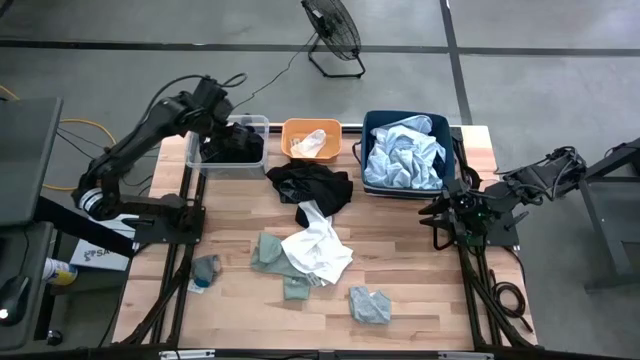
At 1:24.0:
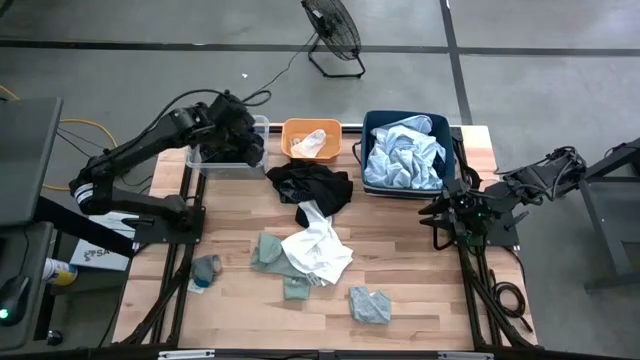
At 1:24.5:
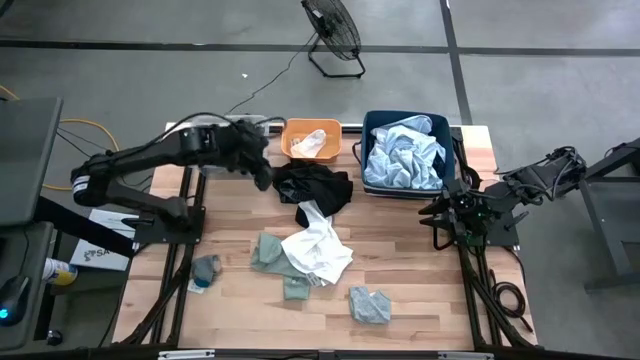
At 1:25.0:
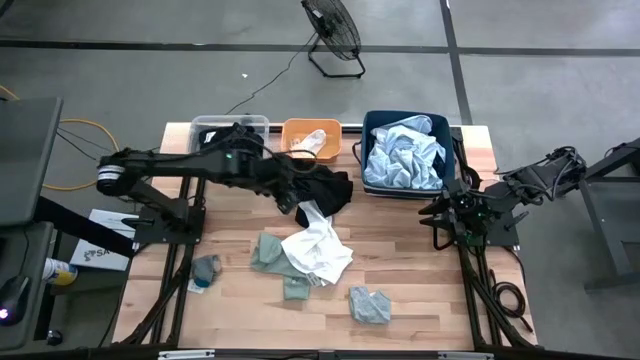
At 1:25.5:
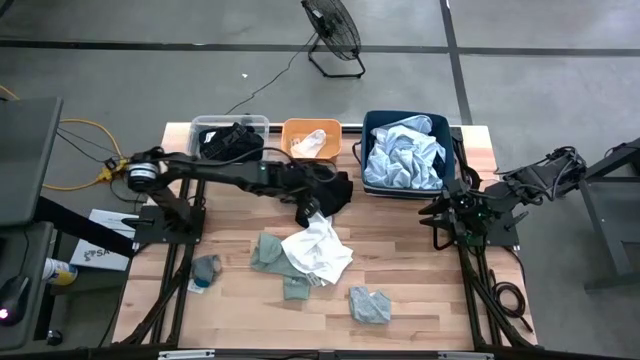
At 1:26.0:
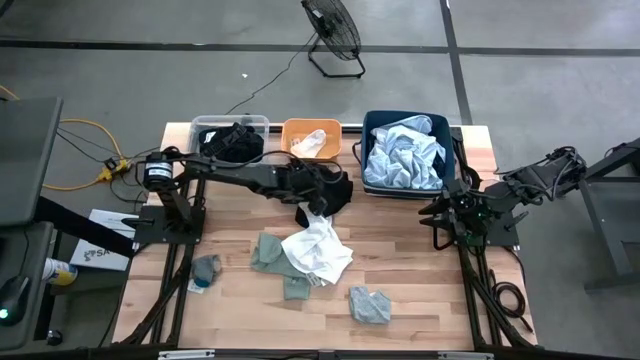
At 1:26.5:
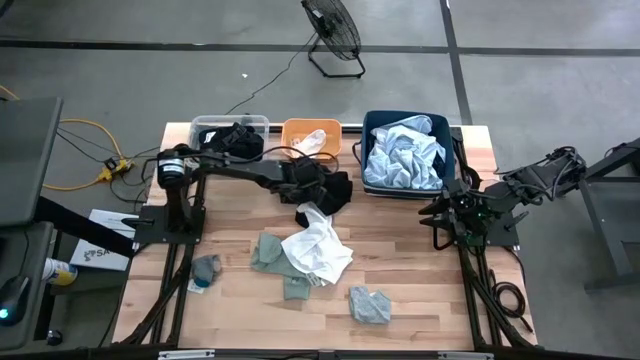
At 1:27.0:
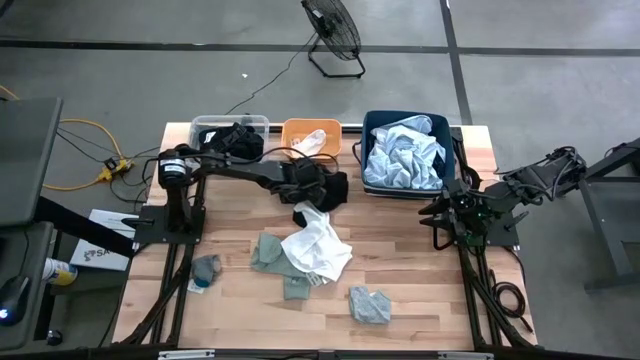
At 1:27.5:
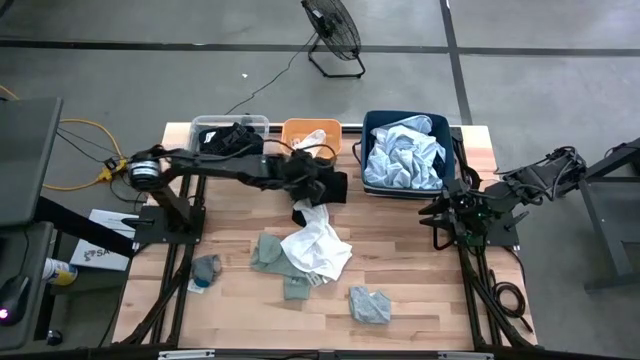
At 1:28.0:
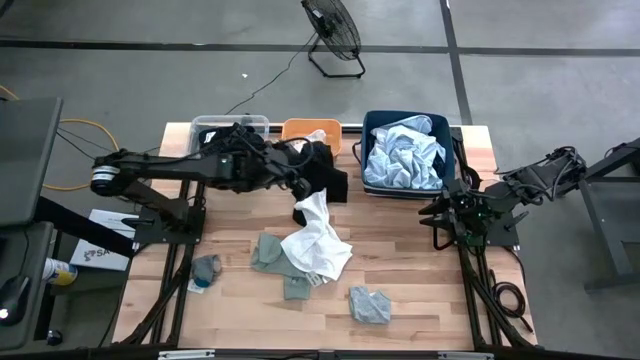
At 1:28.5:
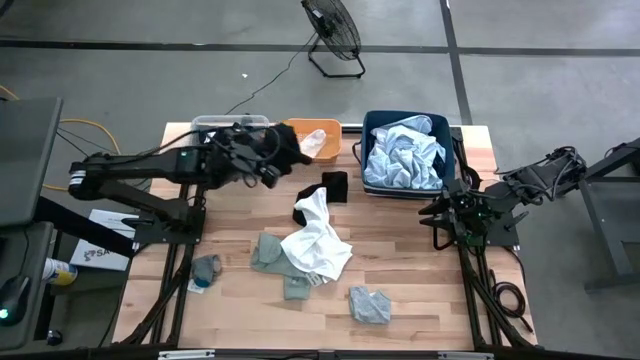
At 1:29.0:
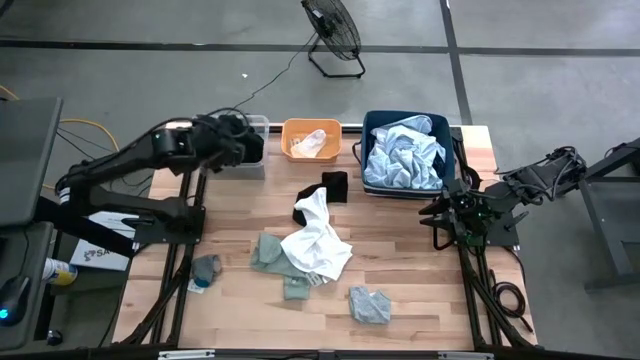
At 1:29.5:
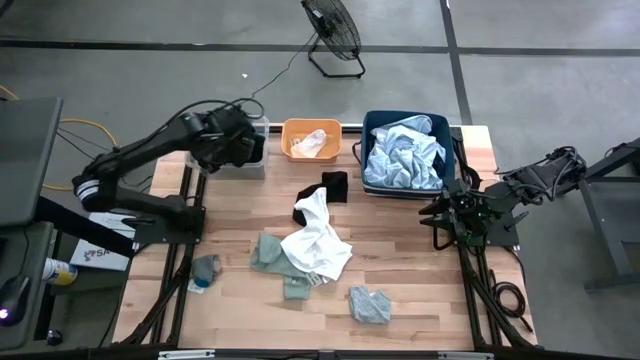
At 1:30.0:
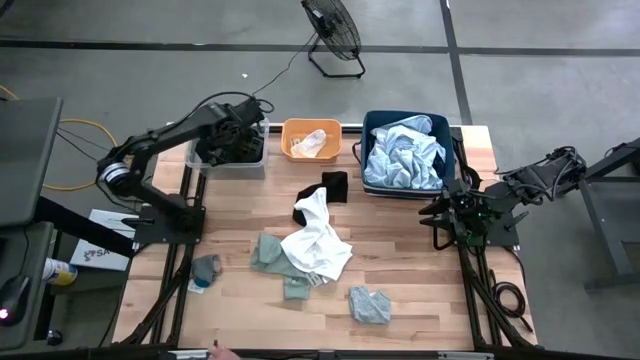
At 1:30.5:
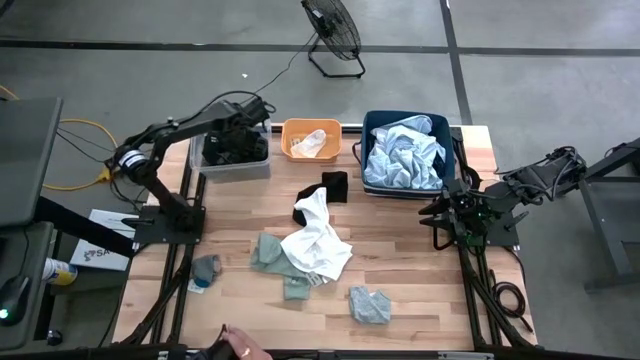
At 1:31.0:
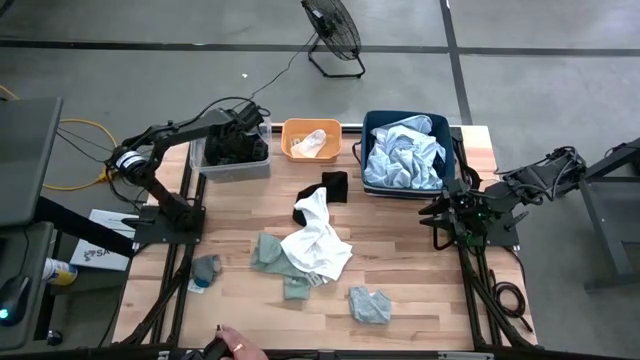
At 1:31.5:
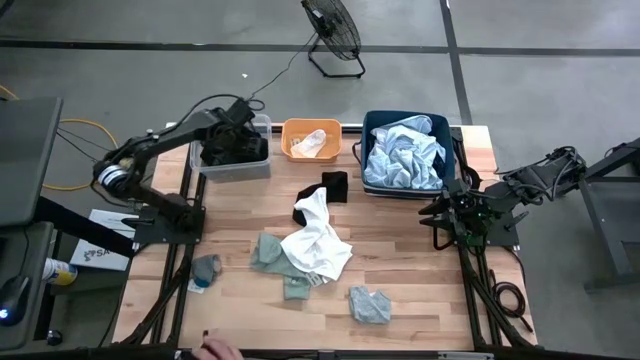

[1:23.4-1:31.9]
Task: Pick & Place Cloths
Put the black underwear into the transparent bin

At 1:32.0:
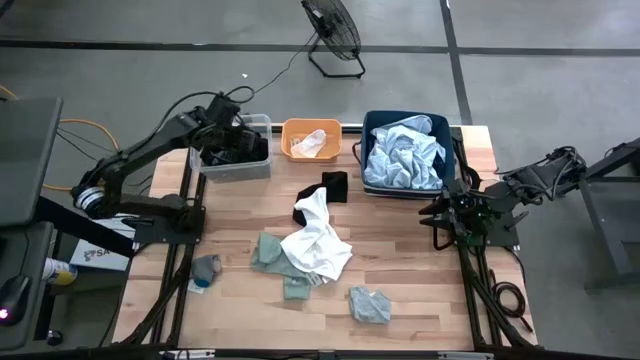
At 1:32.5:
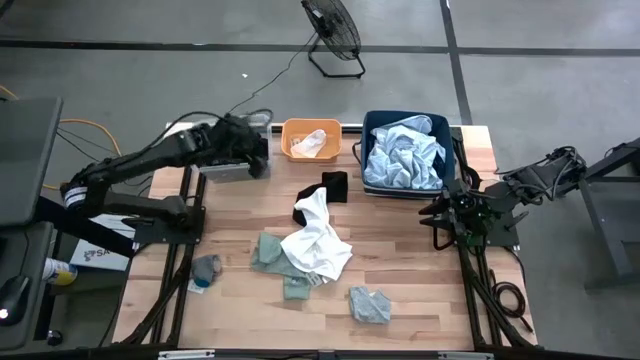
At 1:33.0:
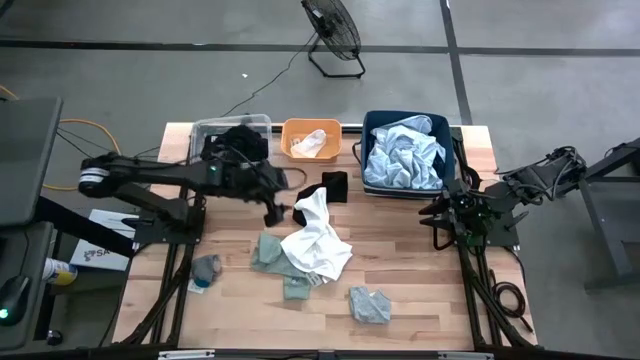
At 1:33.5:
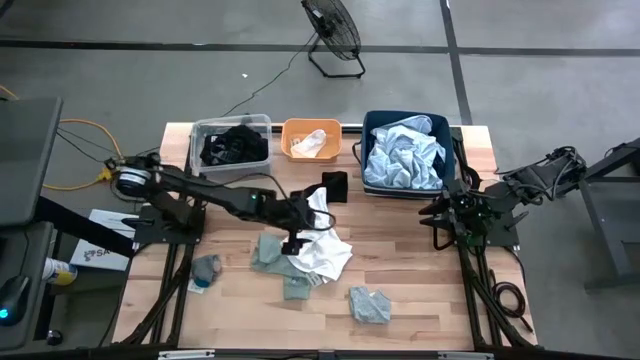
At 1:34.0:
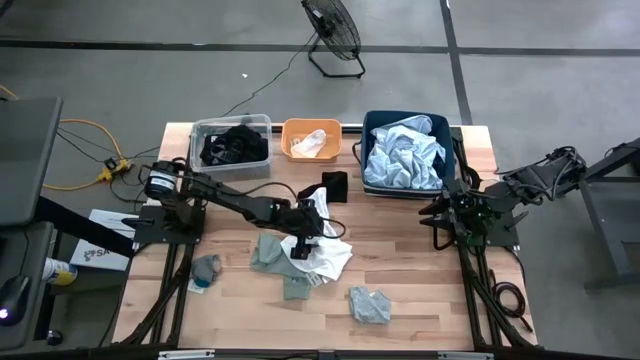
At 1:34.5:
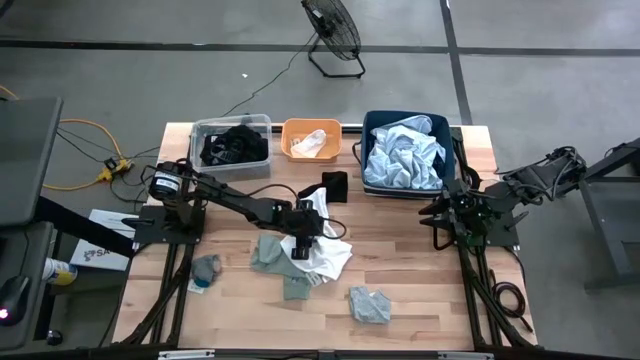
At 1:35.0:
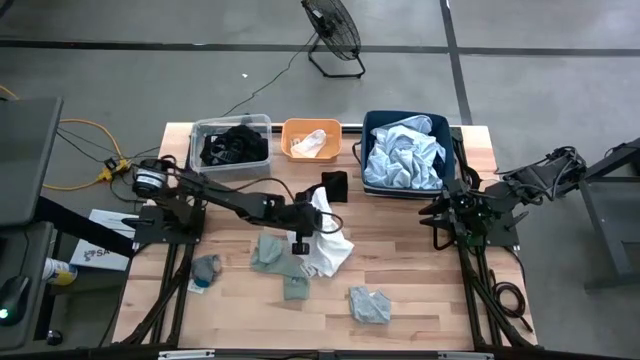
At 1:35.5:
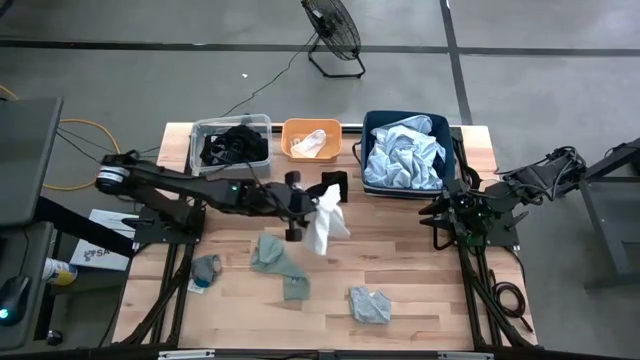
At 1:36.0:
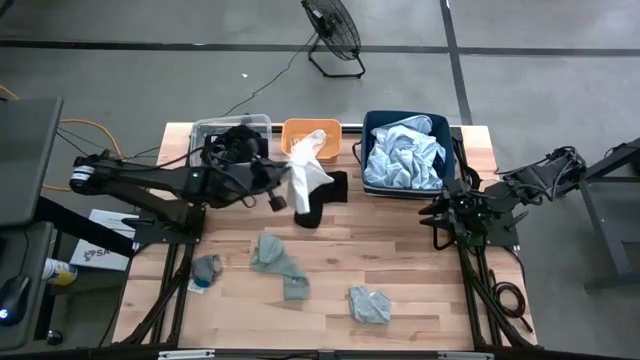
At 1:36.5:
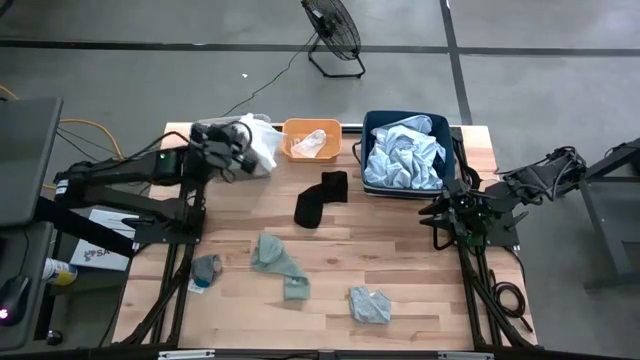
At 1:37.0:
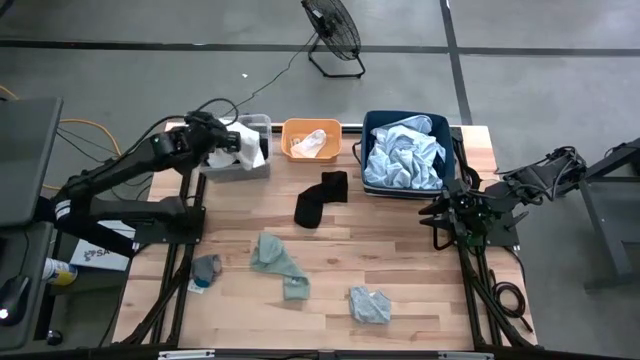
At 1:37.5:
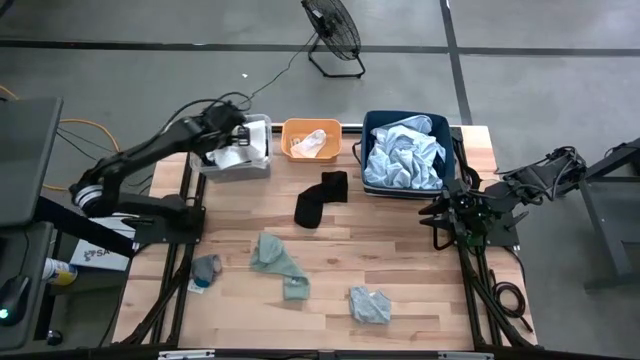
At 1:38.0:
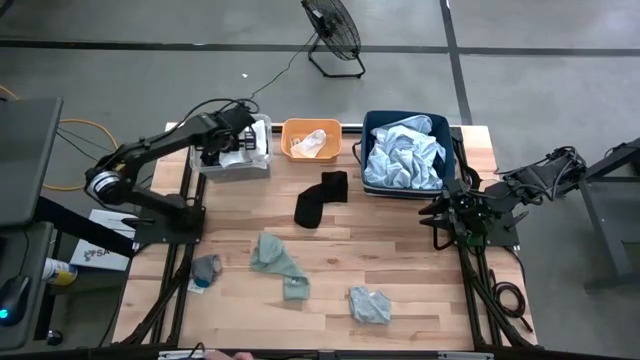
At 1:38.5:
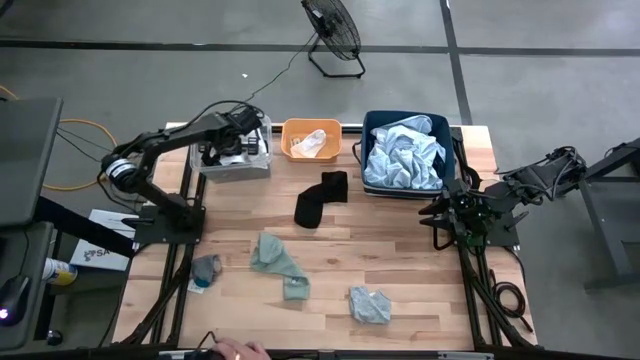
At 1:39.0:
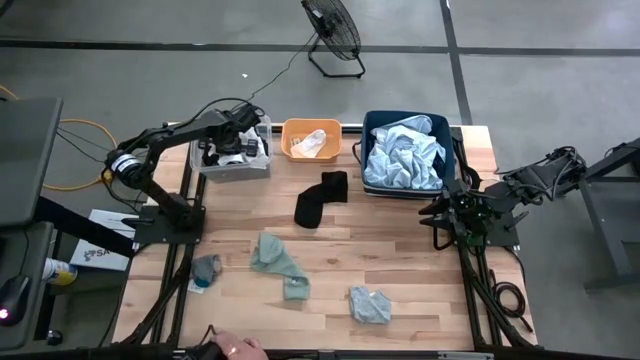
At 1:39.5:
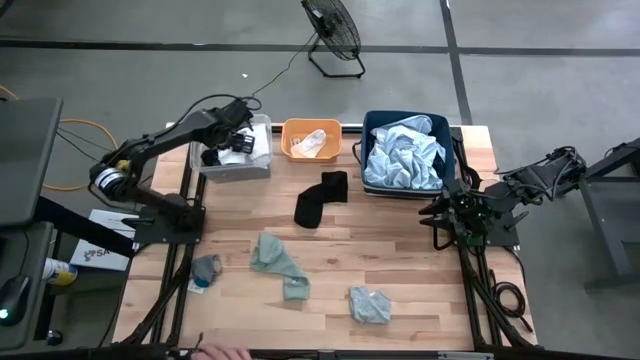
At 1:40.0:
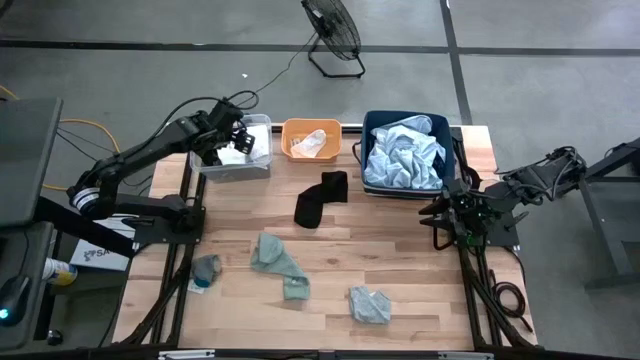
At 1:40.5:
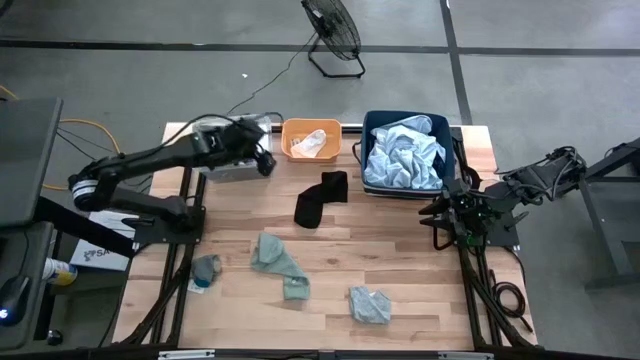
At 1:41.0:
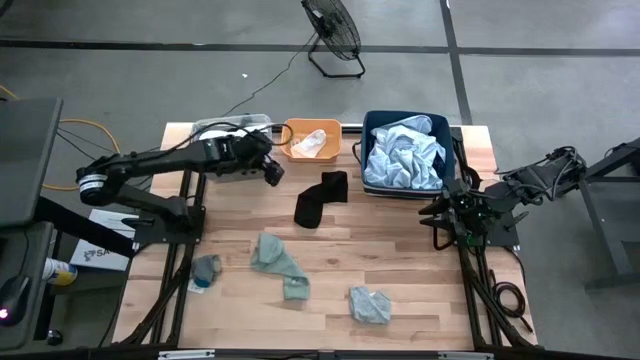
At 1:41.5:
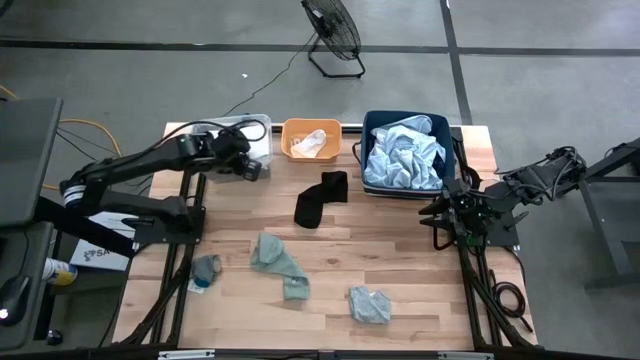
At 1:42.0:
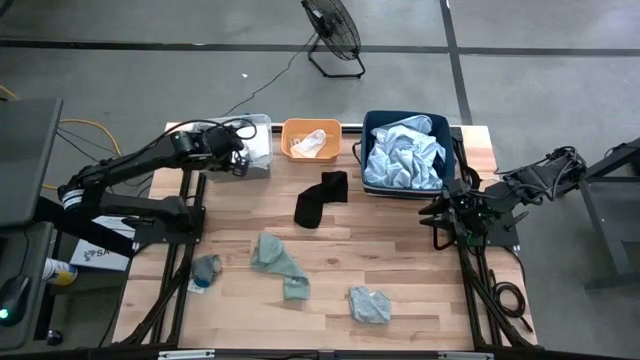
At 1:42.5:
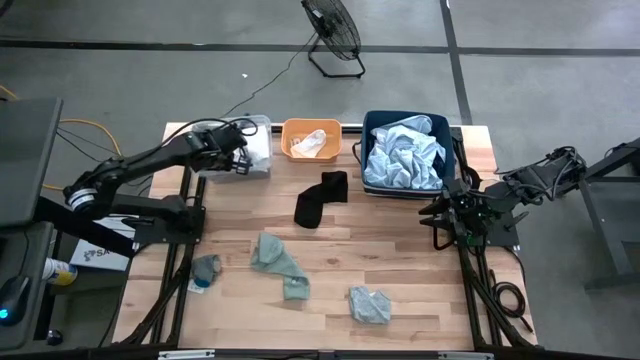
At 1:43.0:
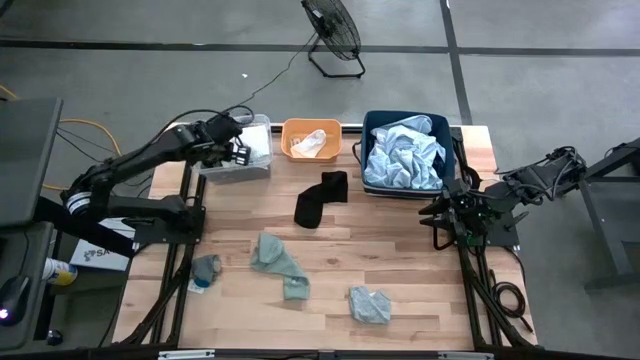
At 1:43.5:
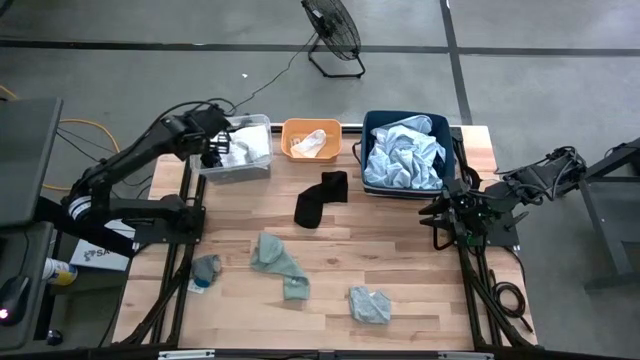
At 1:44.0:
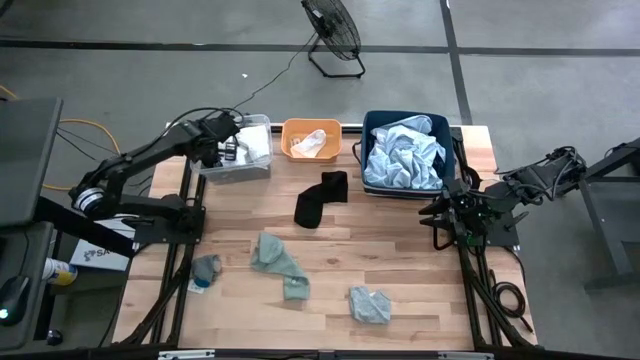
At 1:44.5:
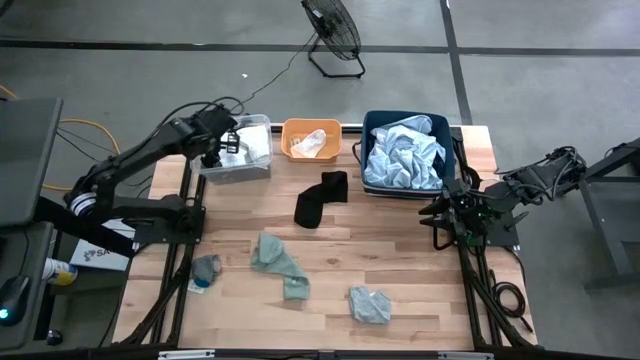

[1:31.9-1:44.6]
Put the white underwear into the transparent bin
